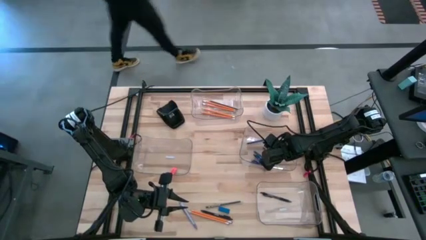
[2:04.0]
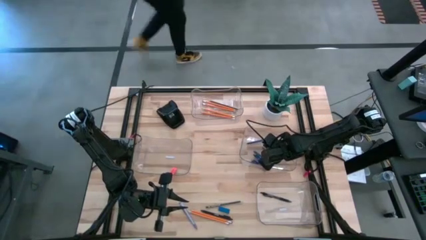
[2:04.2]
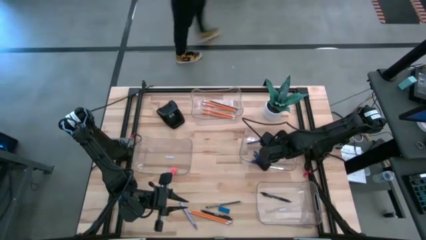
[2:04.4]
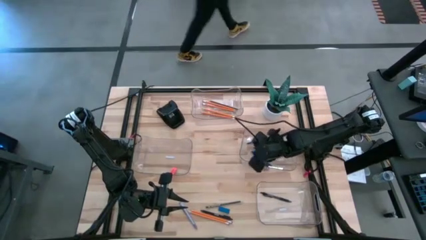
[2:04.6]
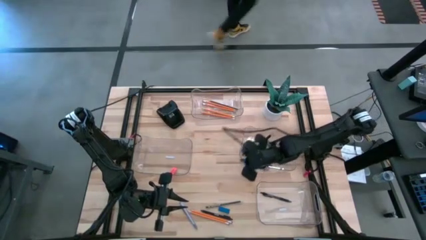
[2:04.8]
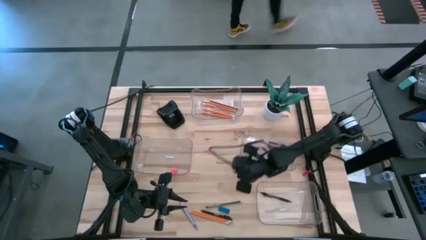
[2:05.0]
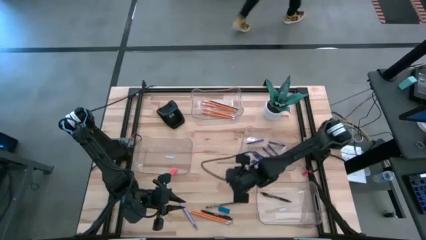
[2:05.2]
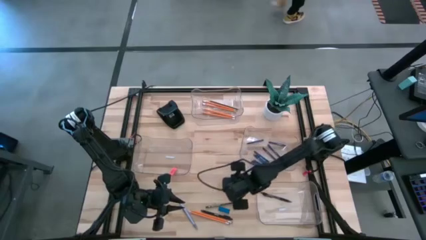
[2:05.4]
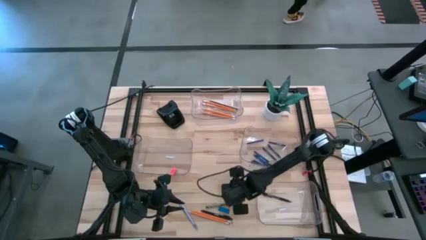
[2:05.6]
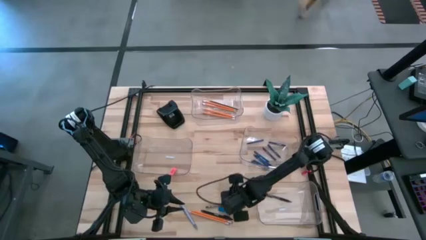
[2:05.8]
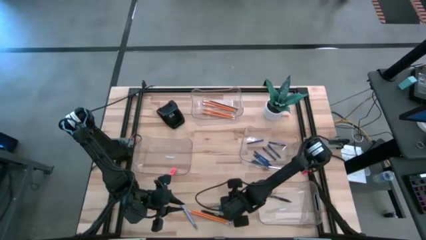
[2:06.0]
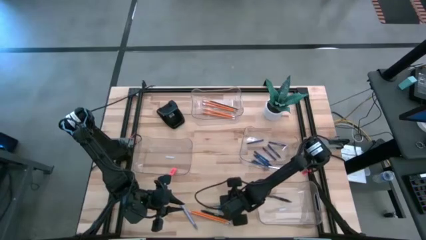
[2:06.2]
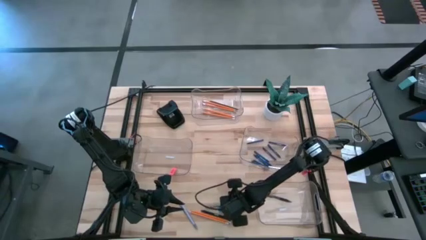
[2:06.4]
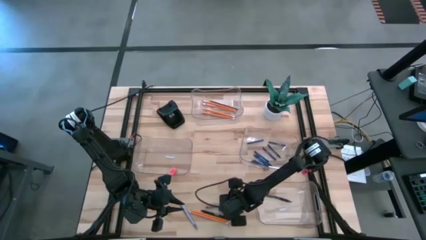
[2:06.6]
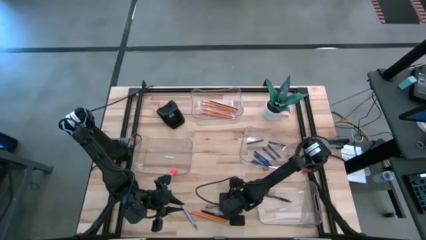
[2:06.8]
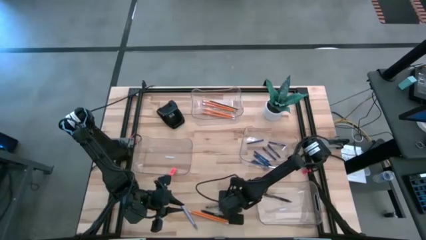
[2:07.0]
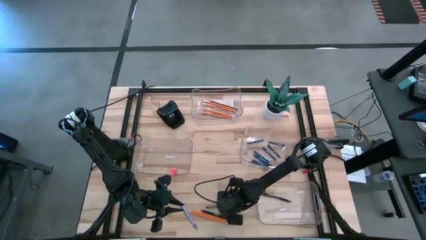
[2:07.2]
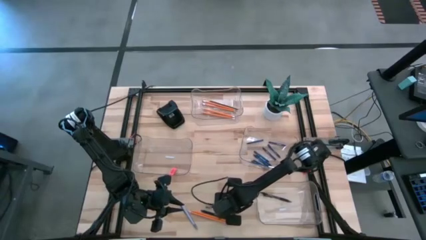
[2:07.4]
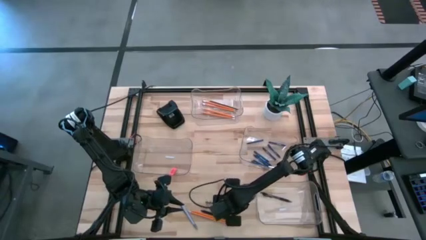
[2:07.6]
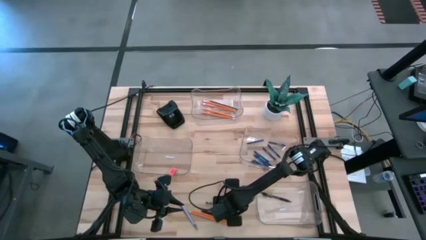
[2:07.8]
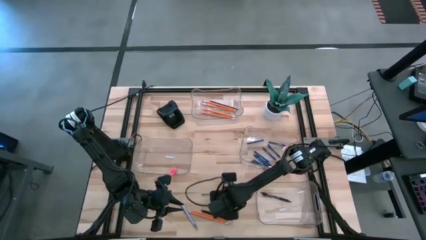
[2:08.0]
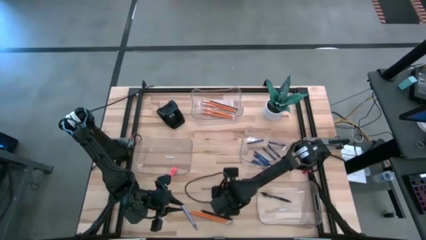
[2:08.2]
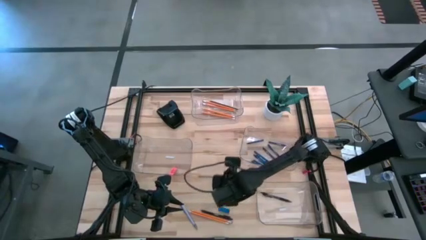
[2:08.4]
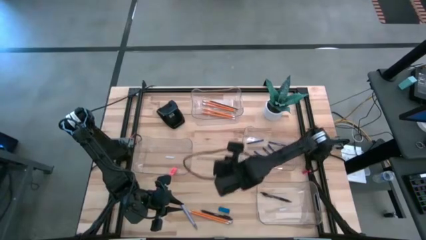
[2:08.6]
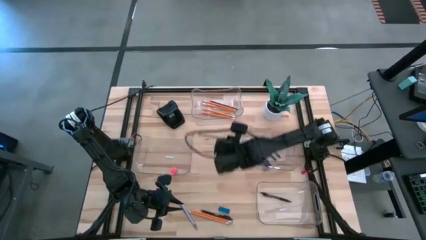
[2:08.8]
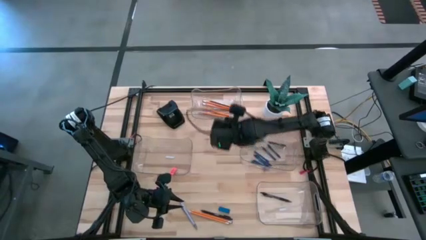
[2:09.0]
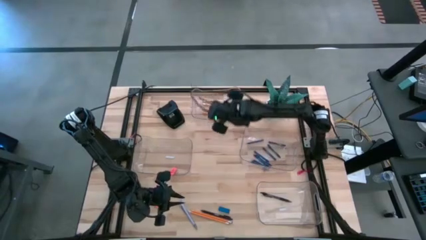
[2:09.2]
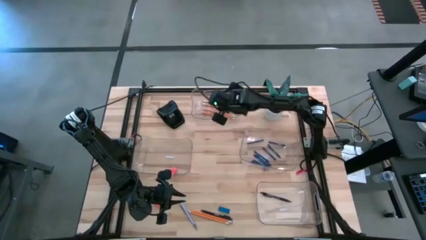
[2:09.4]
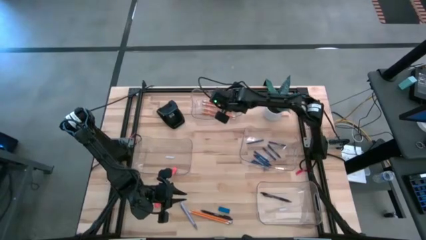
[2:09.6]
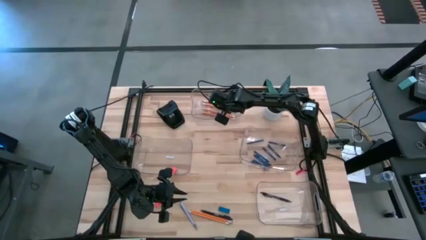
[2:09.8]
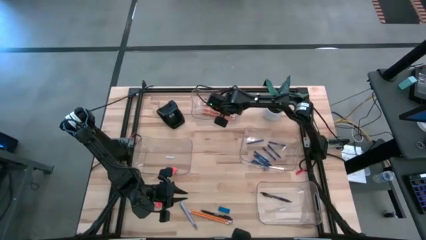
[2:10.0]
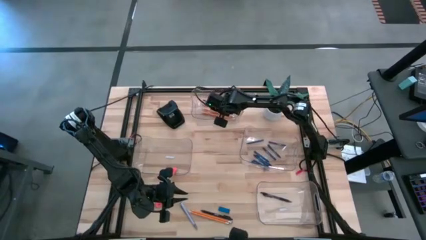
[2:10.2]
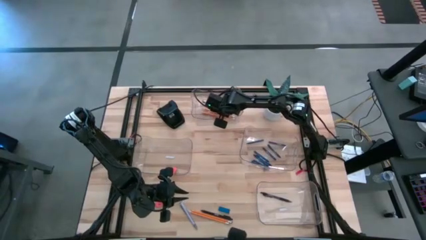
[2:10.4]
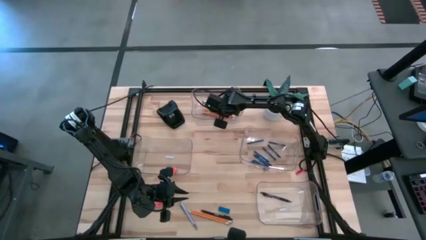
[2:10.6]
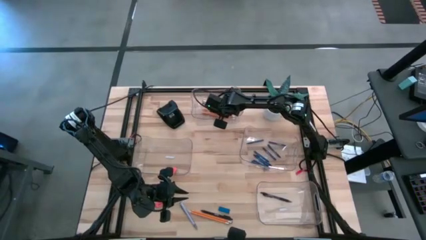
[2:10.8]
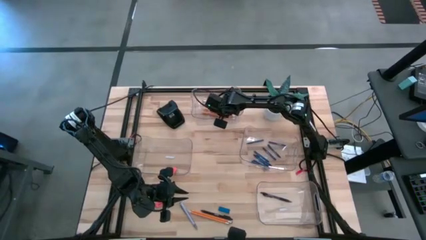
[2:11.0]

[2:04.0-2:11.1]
Task: Sort crayons/erasers/pens/pencils in bins
Put the black pencil into the top transparent bin

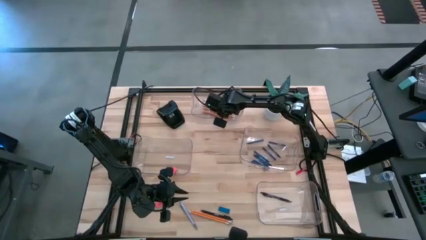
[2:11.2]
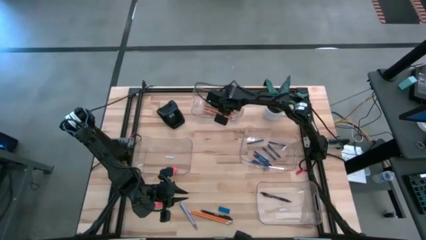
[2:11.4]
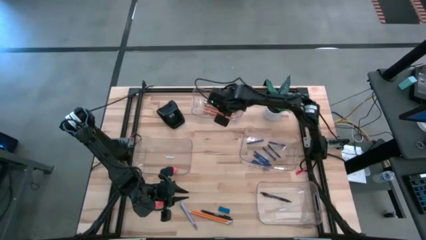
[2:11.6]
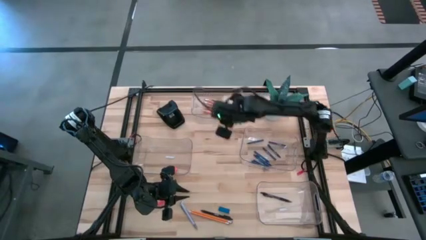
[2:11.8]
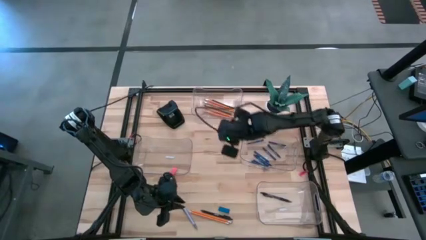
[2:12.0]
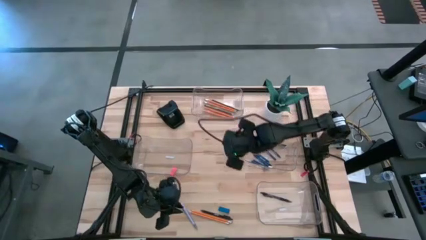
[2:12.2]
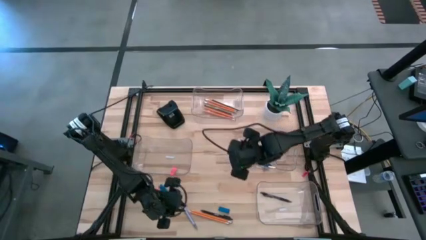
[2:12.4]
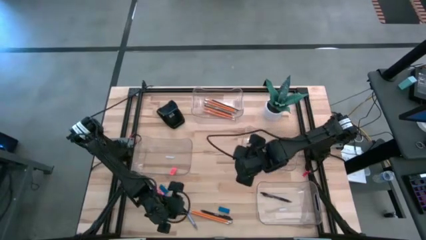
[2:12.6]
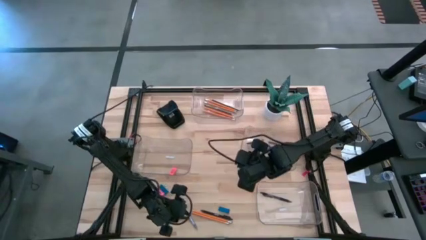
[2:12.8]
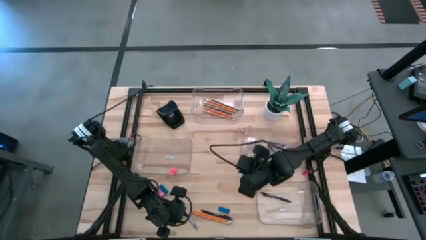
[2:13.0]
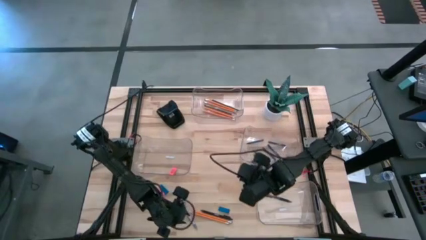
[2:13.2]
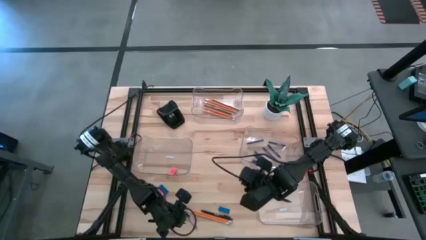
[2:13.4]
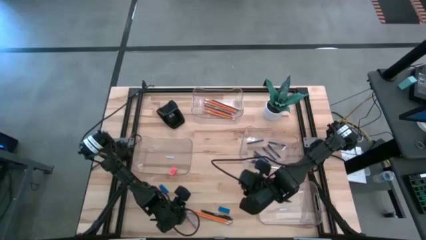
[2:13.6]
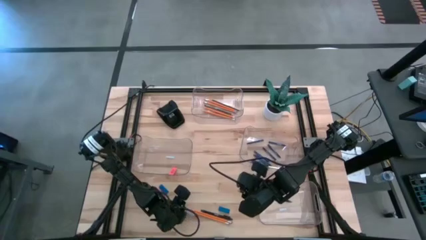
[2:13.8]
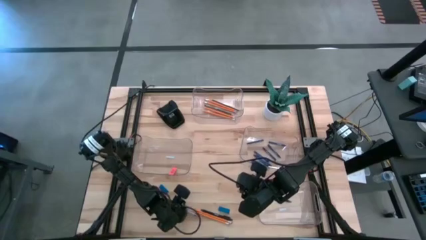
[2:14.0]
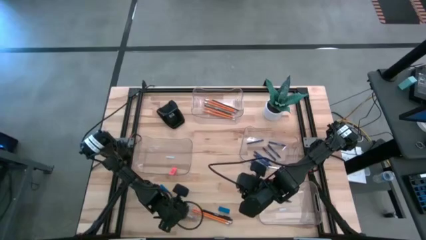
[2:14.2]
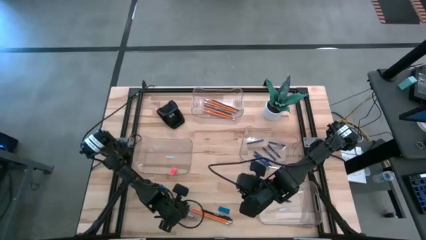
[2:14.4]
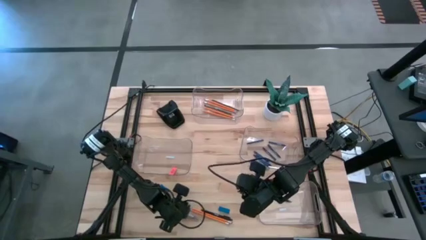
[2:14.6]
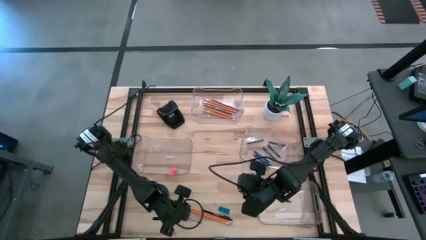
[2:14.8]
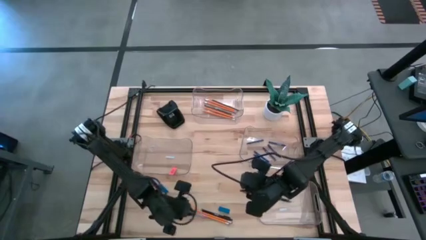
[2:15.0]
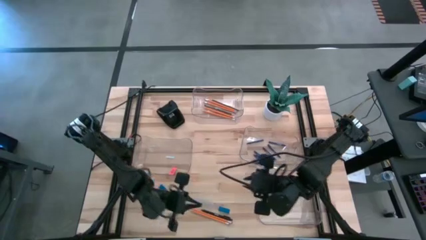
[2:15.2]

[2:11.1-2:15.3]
Put the gray pen into the bottom transparent bin

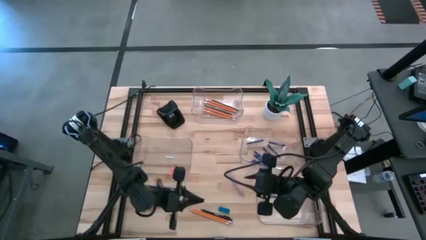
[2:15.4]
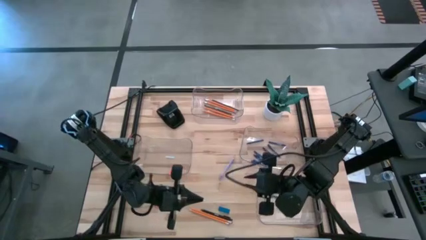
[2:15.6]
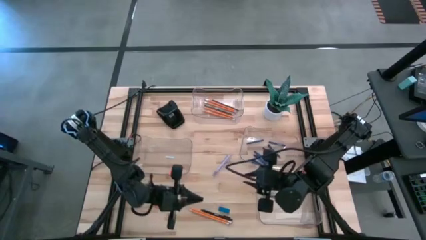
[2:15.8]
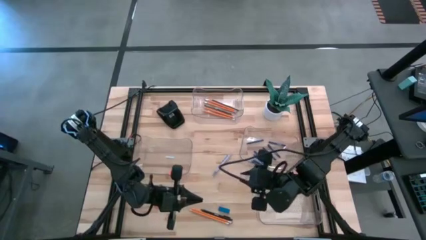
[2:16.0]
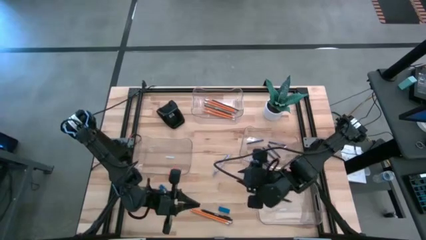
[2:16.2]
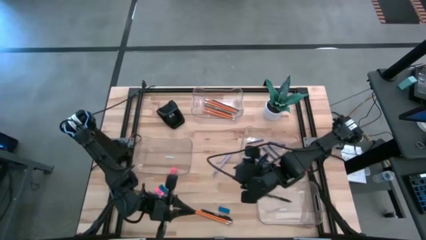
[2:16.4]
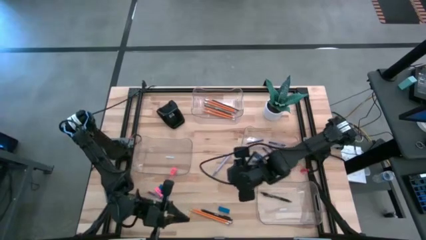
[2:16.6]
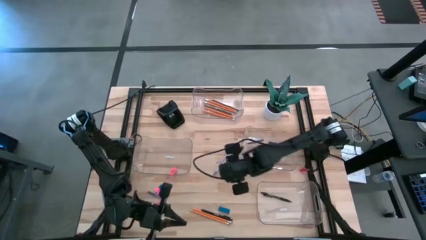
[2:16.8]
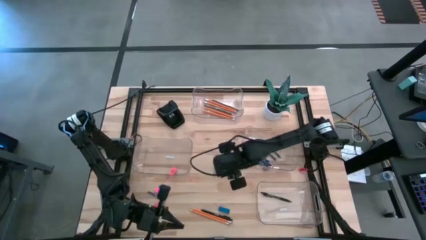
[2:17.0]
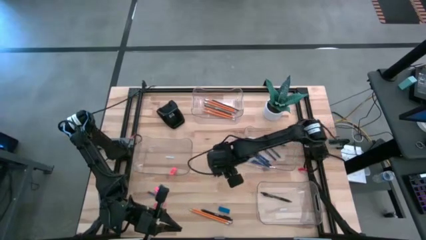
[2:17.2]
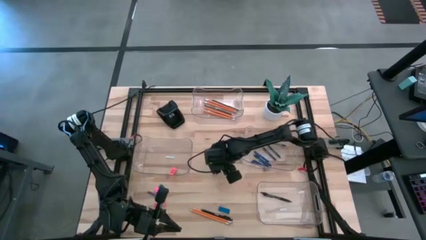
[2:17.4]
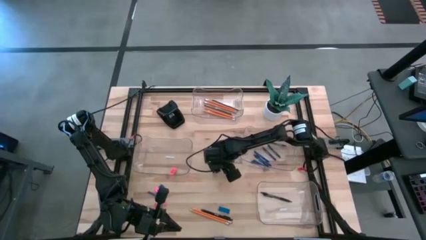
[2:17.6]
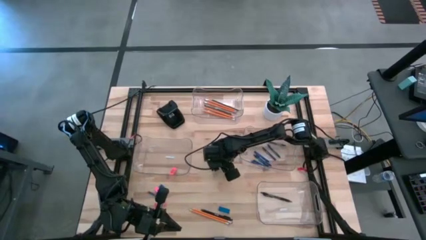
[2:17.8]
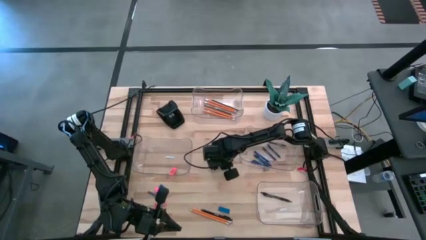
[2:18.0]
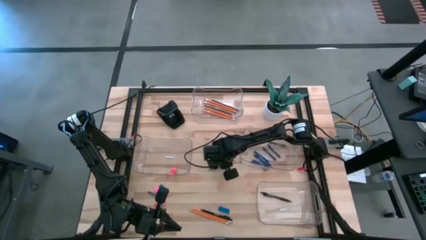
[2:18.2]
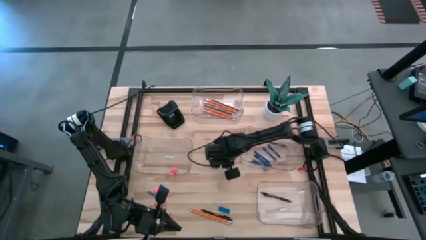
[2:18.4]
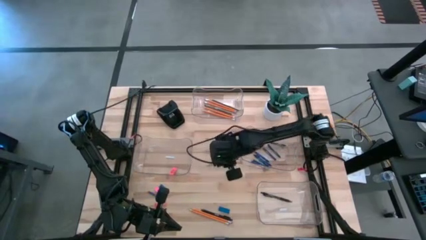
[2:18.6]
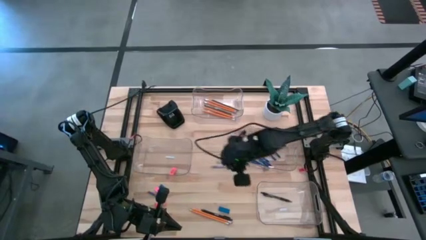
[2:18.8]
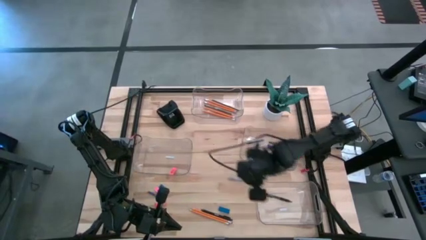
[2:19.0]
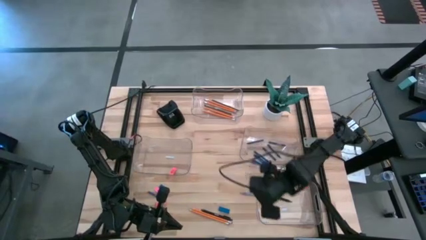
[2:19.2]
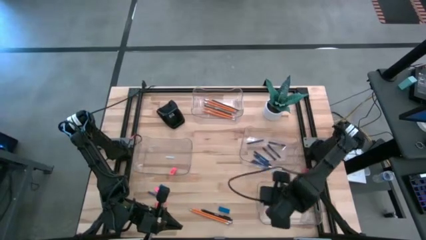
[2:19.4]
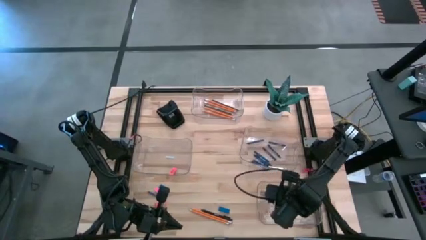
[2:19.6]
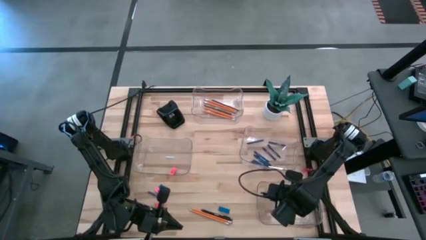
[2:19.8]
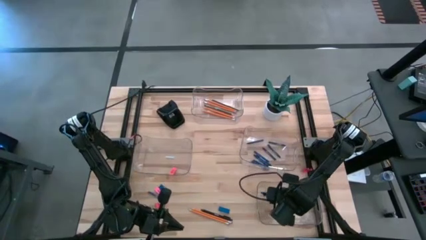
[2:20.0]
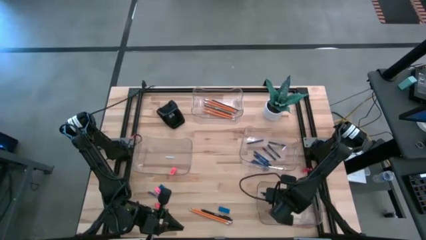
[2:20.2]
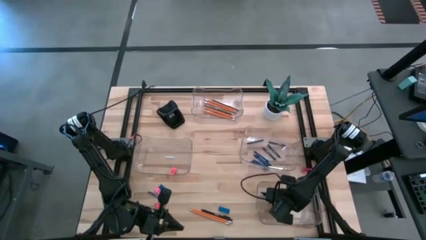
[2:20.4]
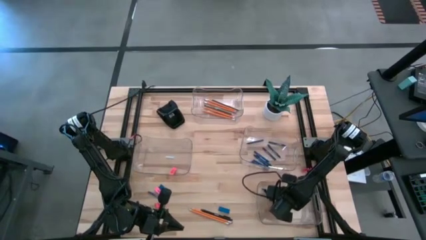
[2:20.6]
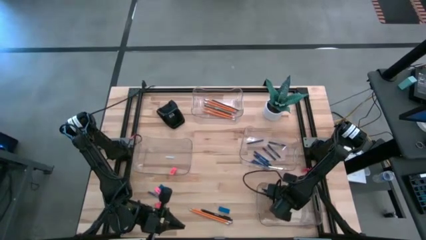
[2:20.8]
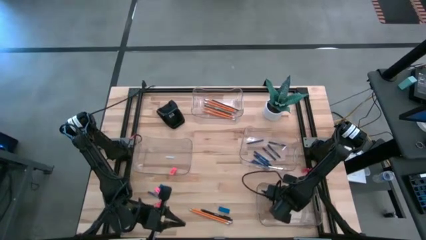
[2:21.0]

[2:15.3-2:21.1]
Put the gray pen into the bottom transparent bin

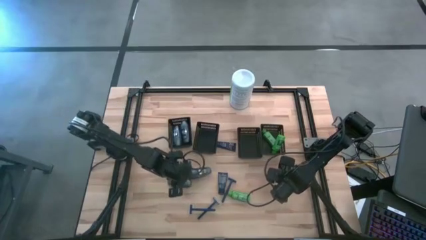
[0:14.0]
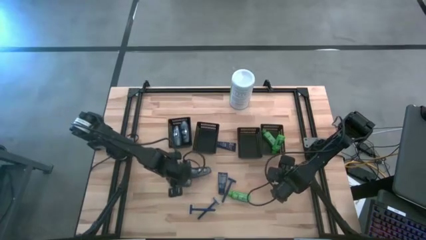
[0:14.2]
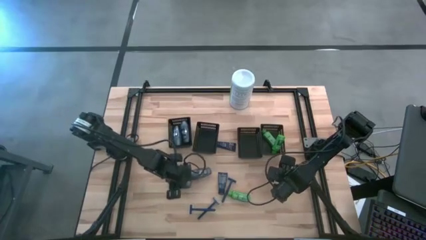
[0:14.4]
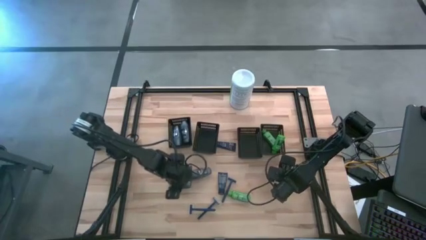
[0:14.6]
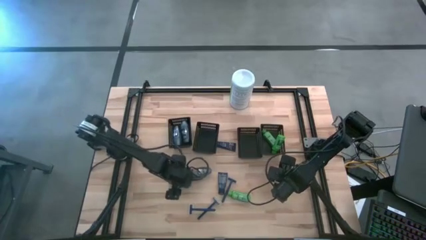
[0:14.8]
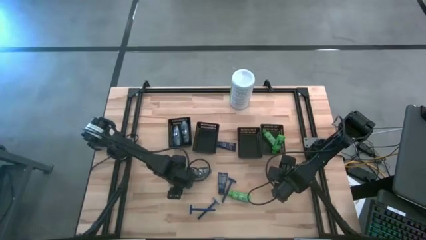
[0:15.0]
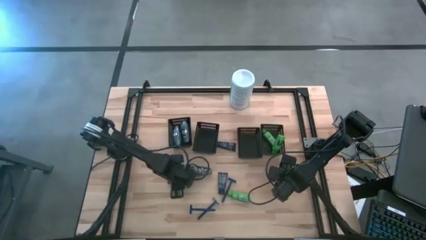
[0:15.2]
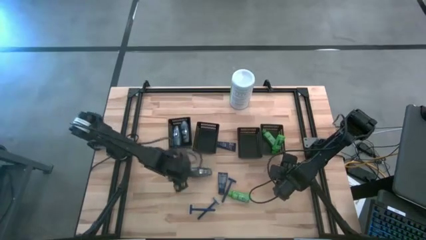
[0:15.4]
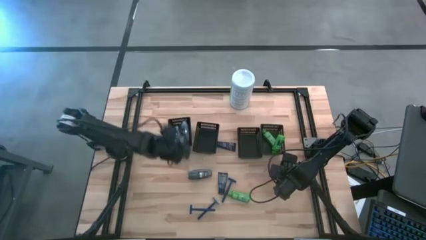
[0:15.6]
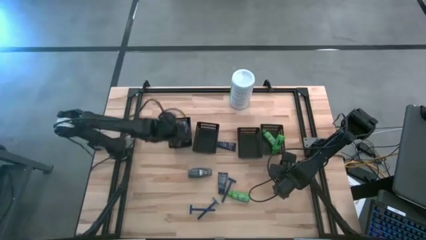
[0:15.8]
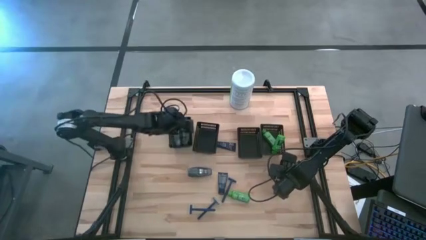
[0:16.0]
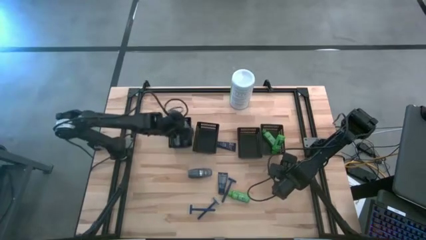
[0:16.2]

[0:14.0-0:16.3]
Task: Pick & Place Travel size toiletries
Put the gray deodorant into the left black bin
